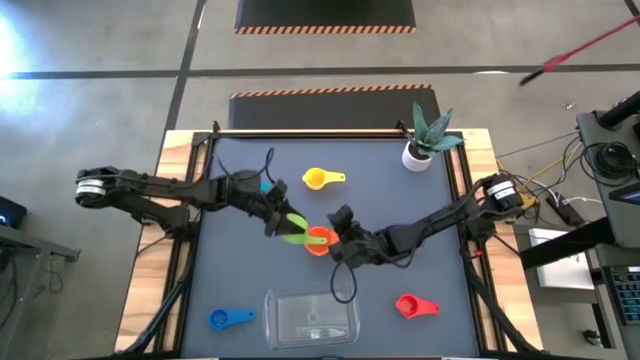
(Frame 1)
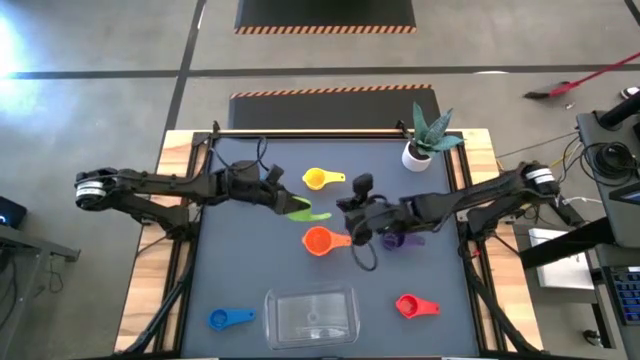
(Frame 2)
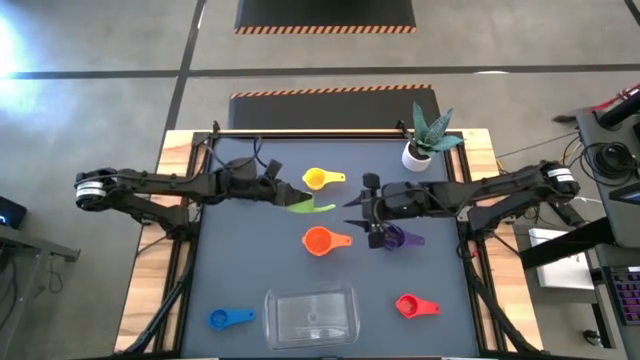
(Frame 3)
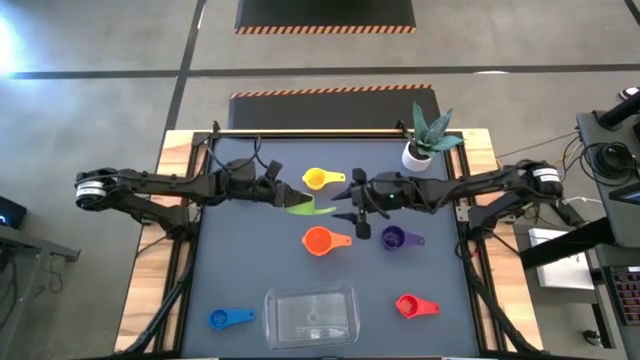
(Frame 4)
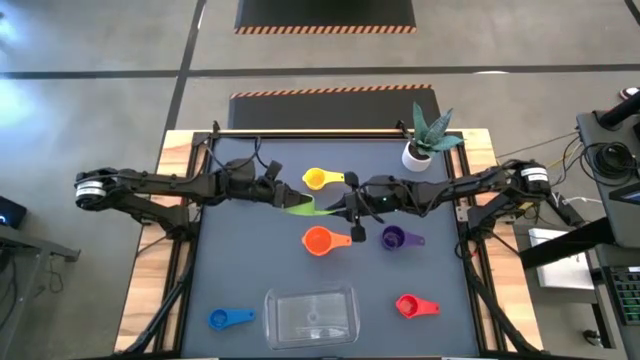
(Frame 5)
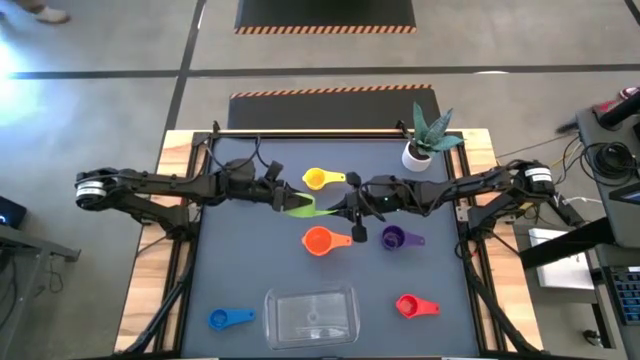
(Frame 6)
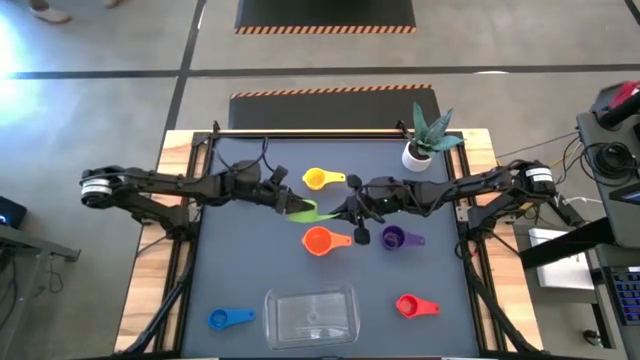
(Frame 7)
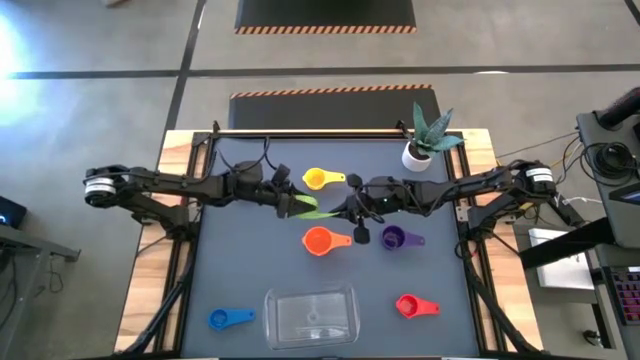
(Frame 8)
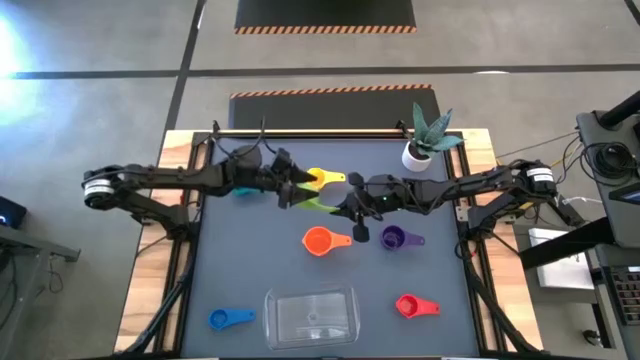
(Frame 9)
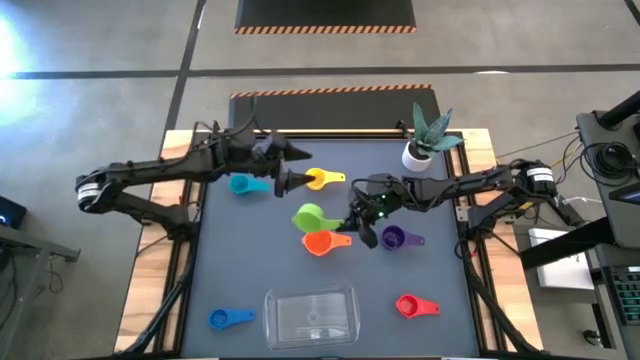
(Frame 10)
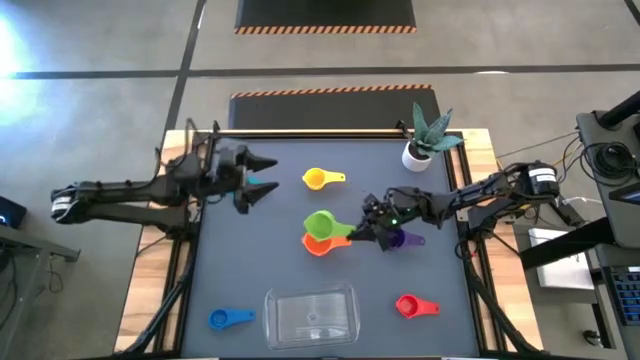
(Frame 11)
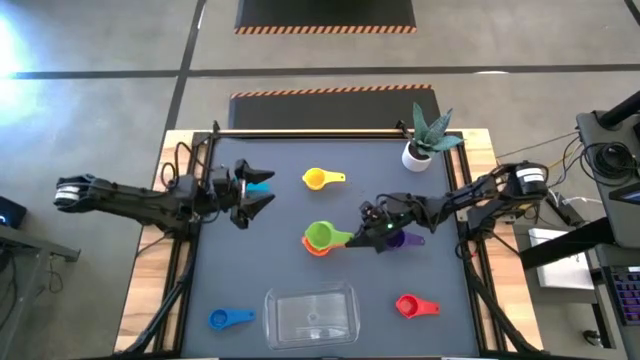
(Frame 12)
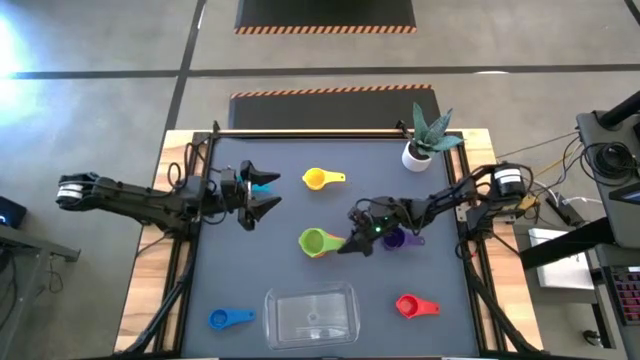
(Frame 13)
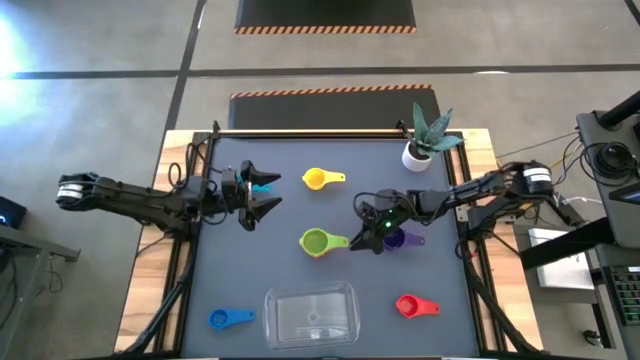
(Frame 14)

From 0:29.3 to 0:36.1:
Task: Nest measuring cups in basket
Stack the green measuring cup on top of the orange measuring cup

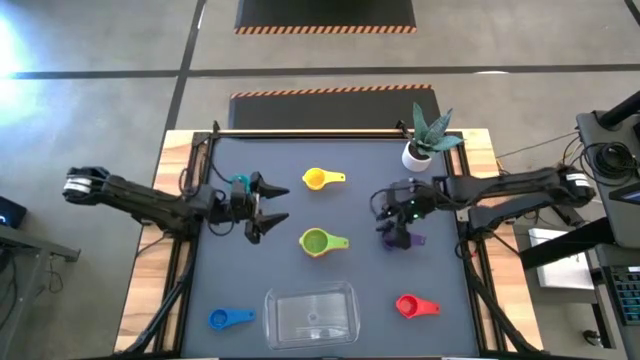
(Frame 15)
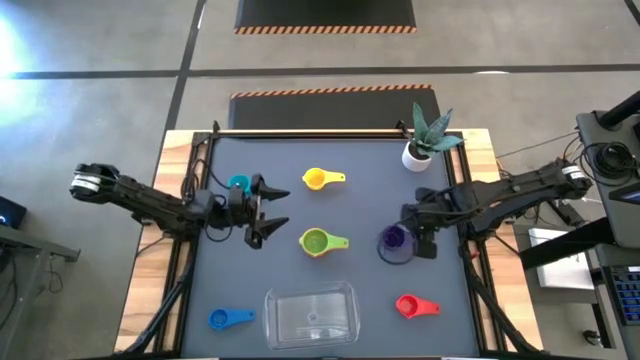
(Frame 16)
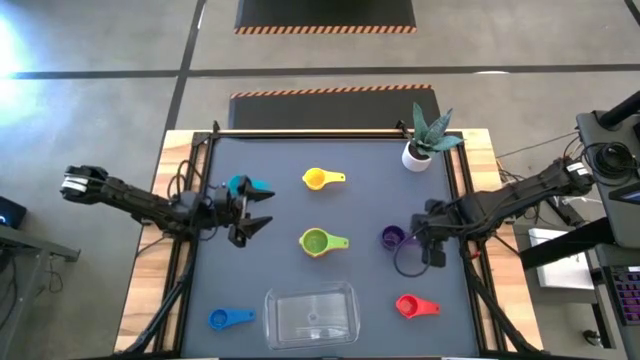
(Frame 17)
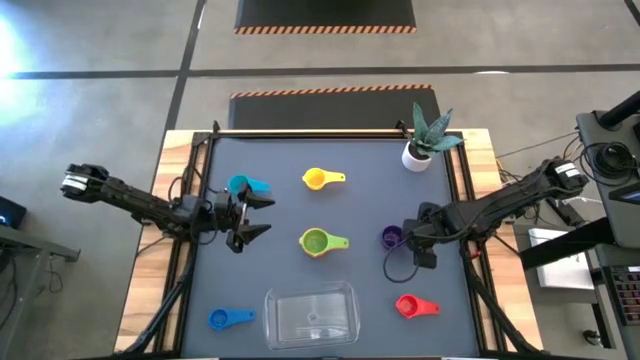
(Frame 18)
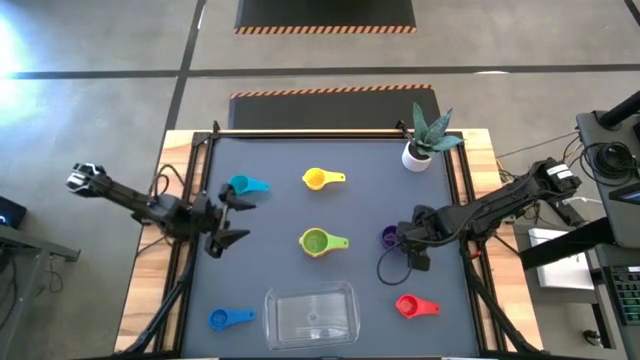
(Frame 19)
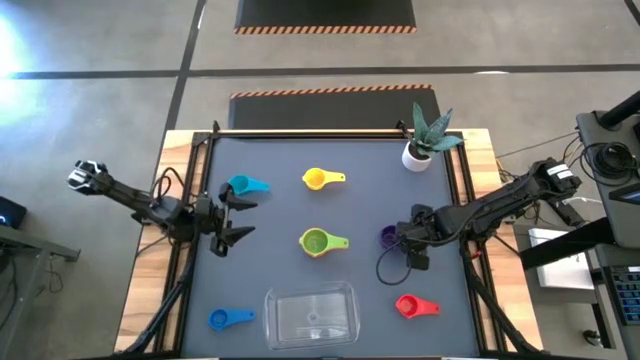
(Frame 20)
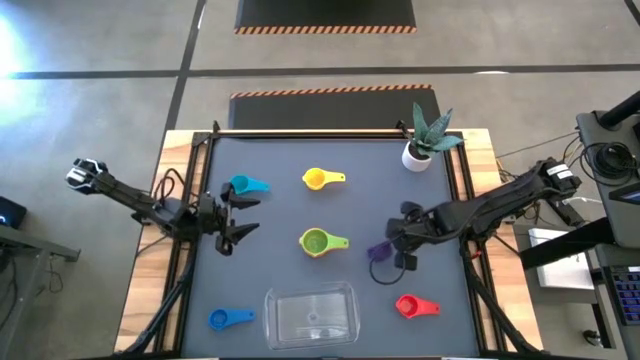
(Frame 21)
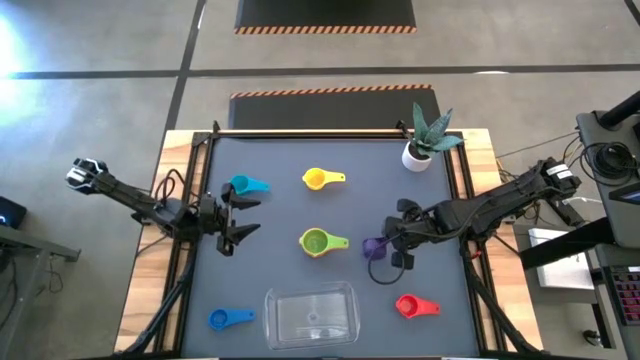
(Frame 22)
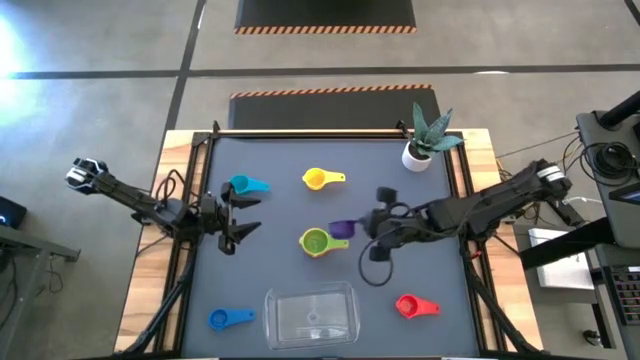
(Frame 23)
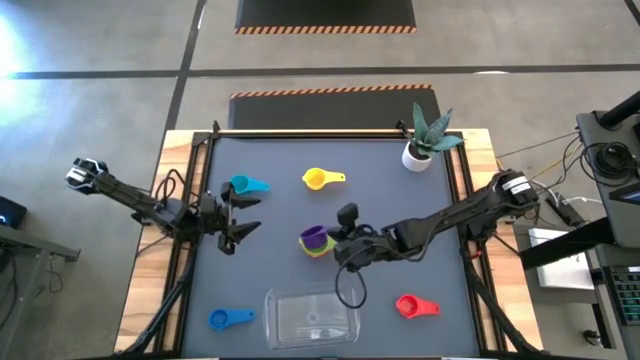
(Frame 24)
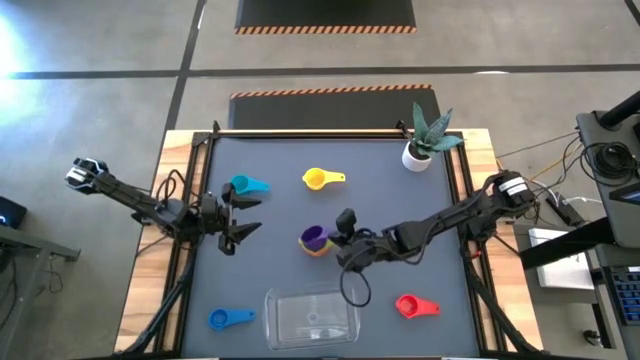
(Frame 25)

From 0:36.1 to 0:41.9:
Stack the violet measuring cup on top of the green measuring cup

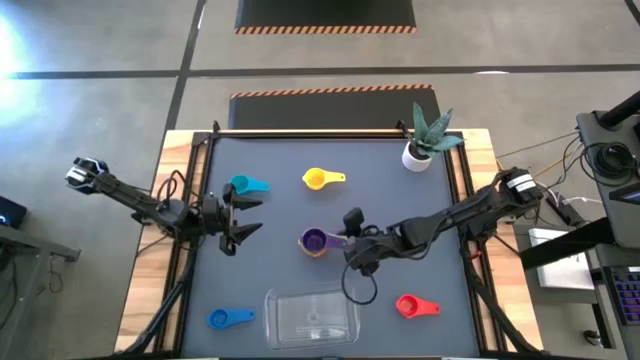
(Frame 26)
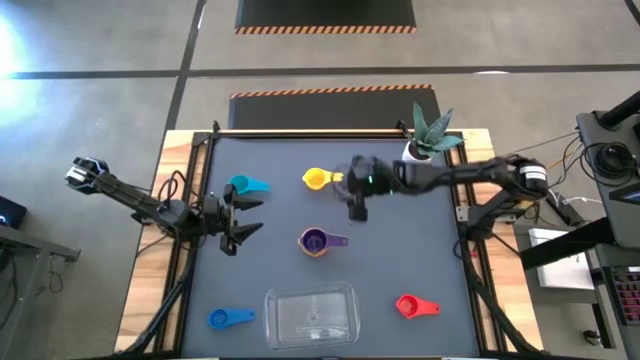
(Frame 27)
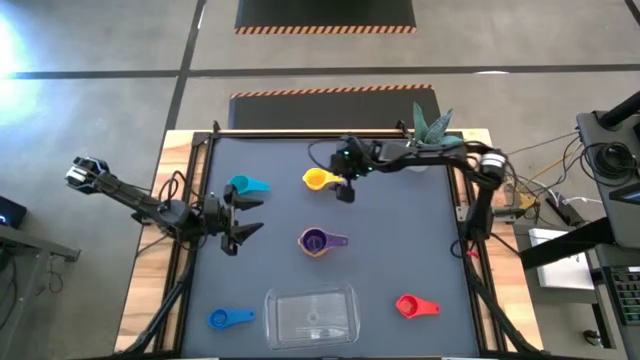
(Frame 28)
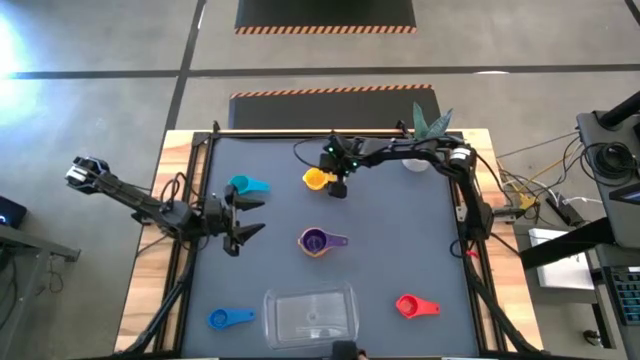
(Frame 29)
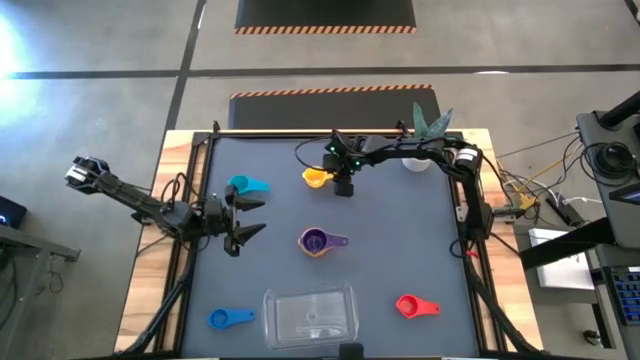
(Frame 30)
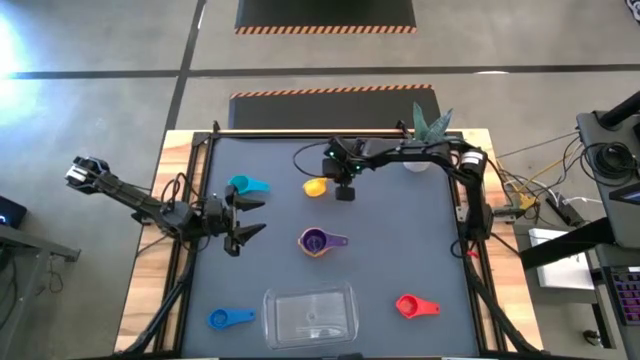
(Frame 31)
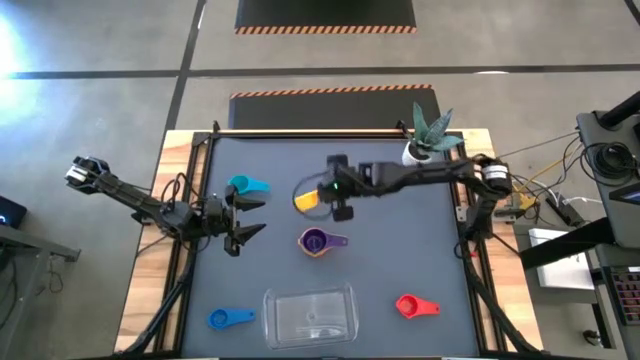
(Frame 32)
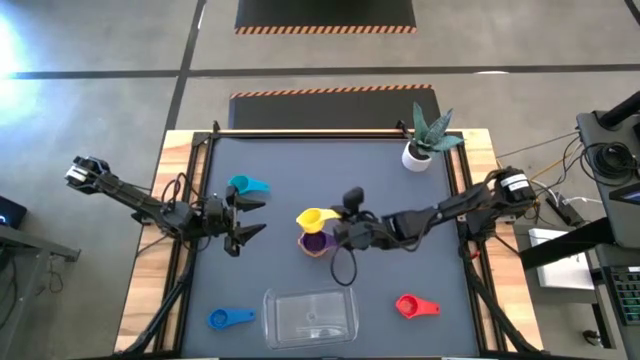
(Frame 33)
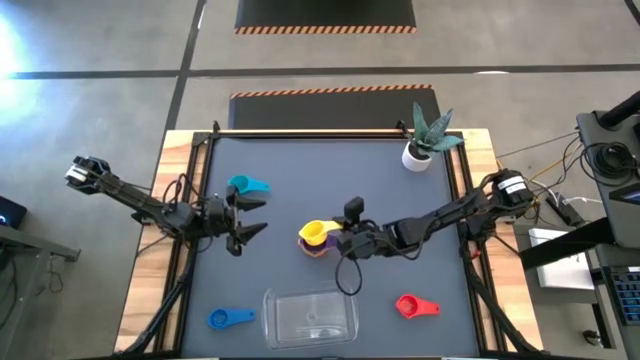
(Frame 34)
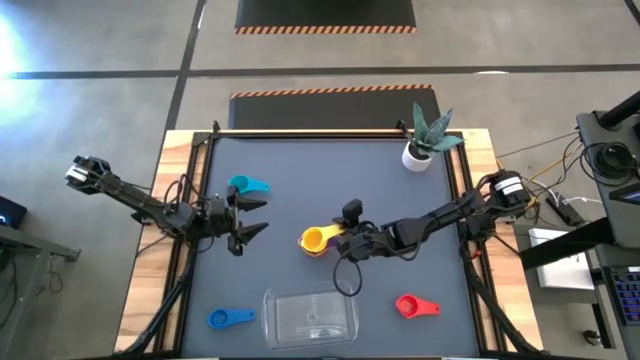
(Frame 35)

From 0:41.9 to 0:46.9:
Stack the yellow measuring cup on top of the violet measuring cup

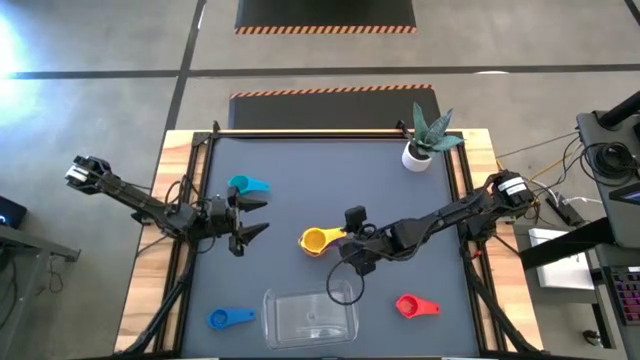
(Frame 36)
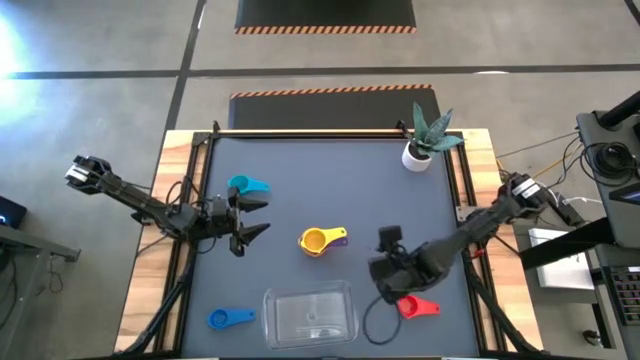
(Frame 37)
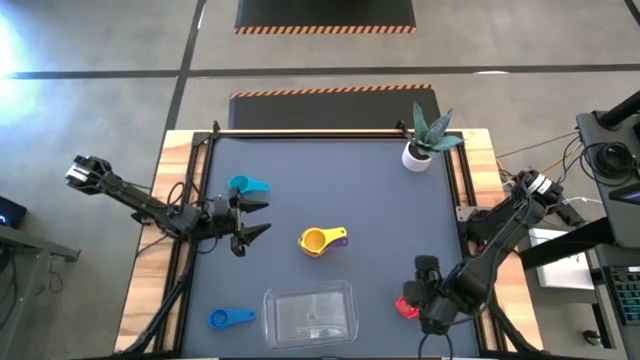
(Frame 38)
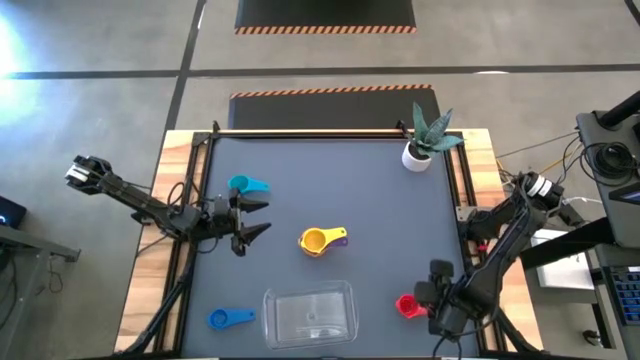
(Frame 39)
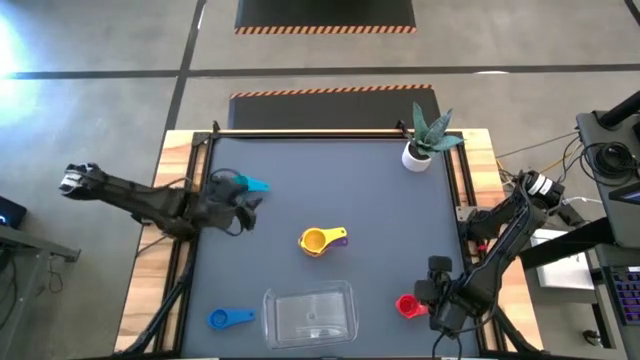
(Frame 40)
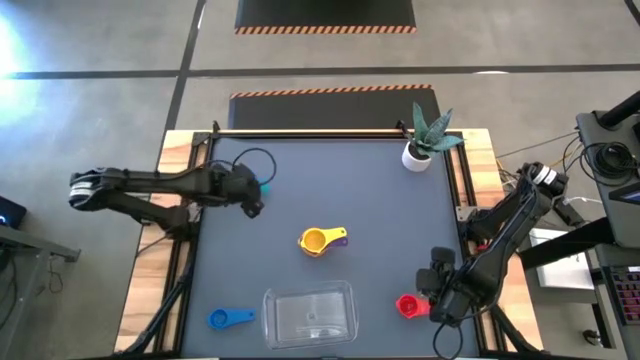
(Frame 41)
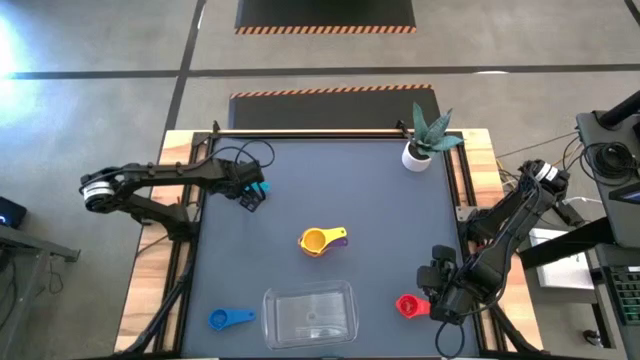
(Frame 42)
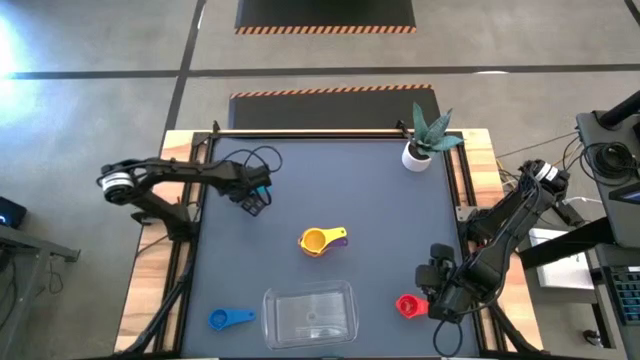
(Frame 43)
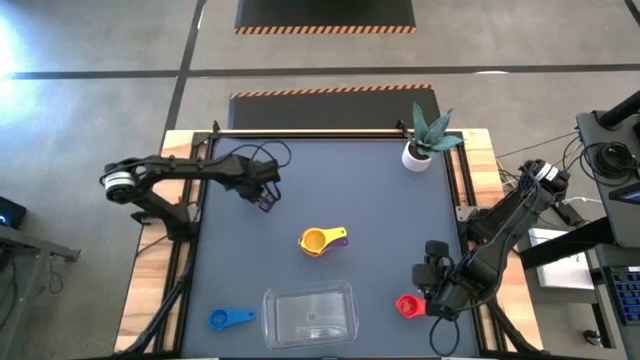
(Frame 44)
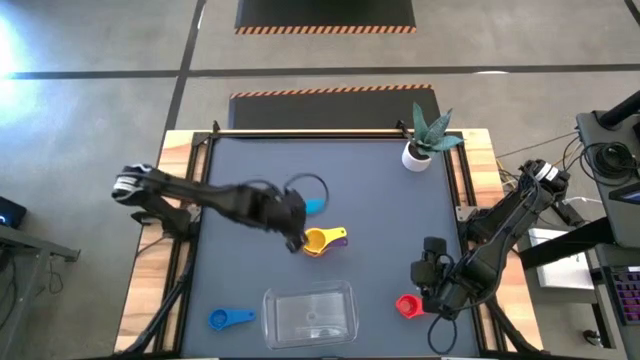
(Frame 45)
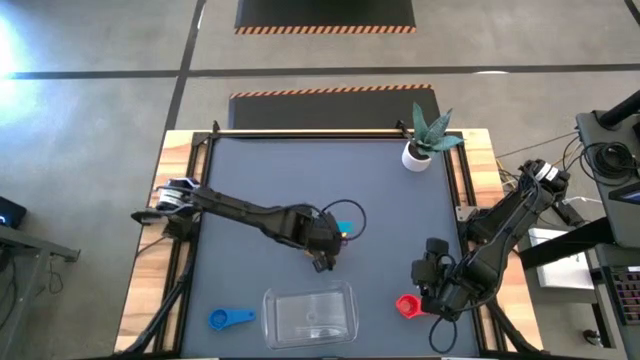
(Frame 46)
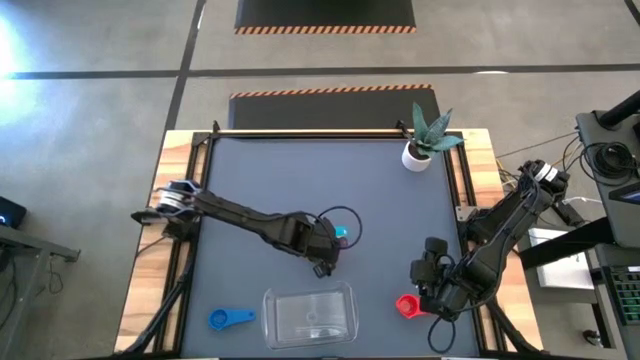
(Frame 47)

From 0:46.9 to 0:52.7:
Stack the light blue measuring cup on top of the yellow measuring cup
